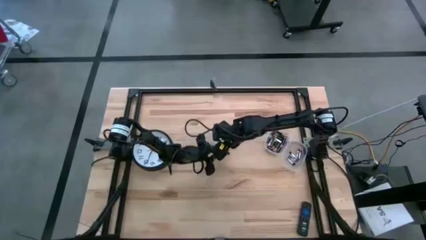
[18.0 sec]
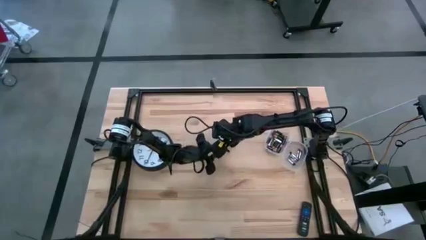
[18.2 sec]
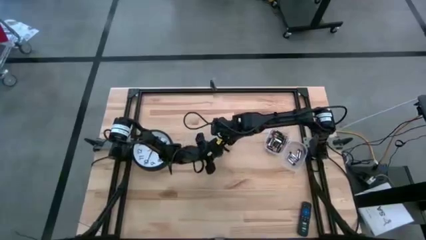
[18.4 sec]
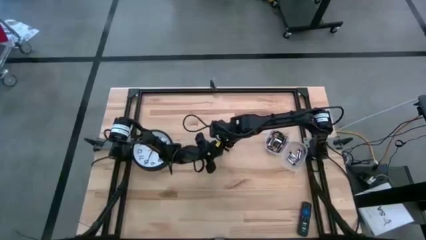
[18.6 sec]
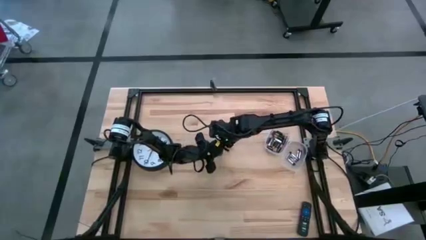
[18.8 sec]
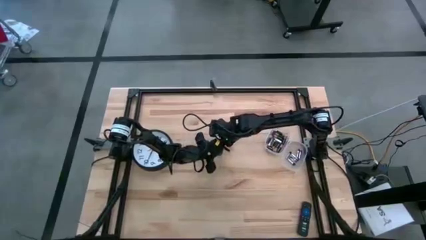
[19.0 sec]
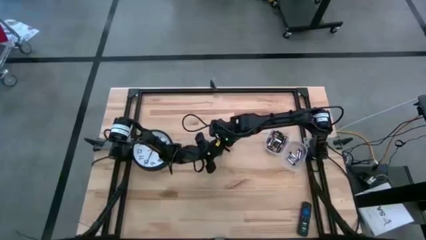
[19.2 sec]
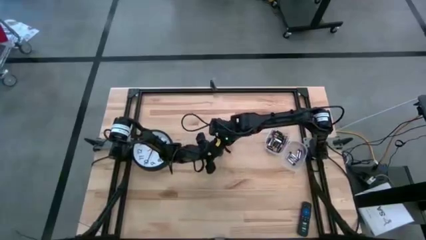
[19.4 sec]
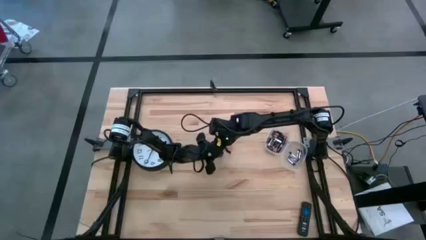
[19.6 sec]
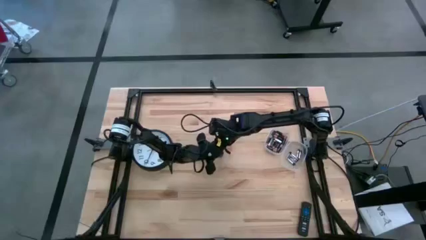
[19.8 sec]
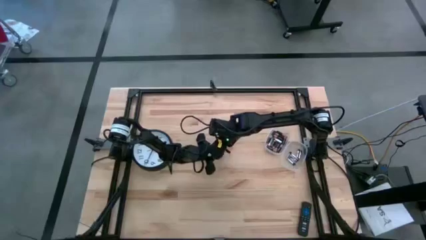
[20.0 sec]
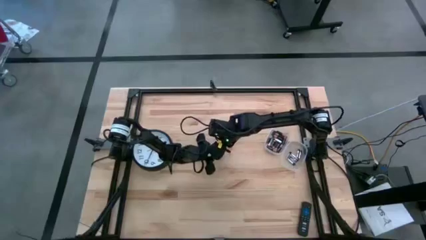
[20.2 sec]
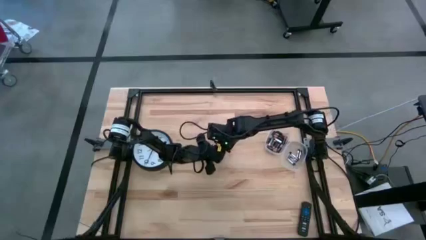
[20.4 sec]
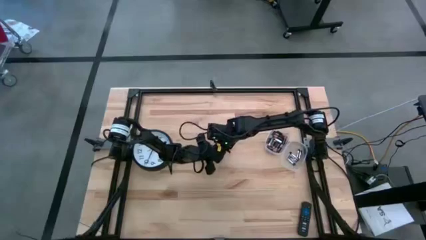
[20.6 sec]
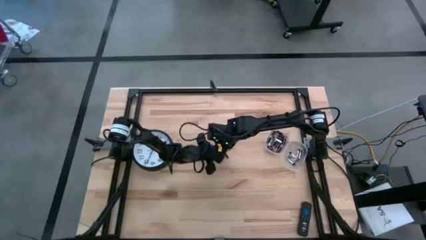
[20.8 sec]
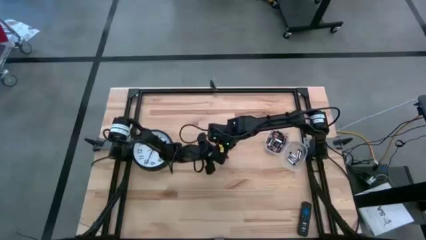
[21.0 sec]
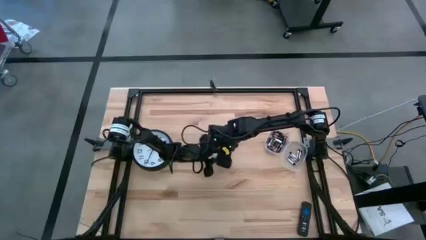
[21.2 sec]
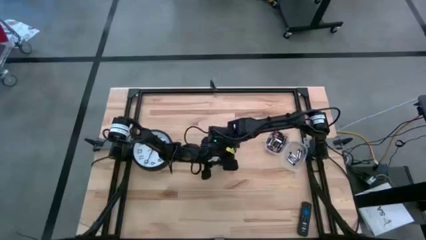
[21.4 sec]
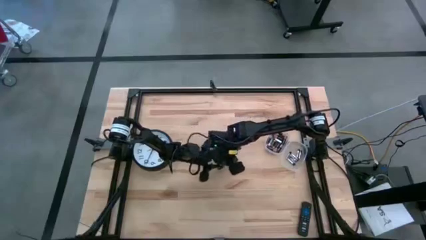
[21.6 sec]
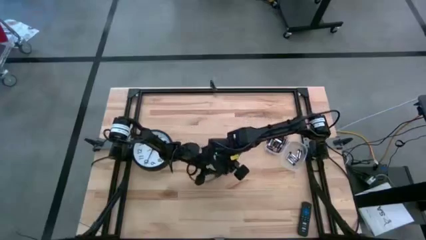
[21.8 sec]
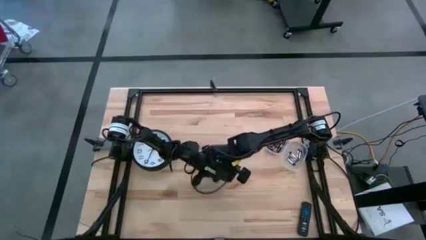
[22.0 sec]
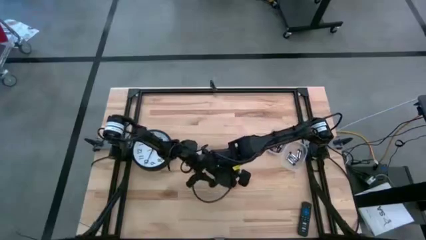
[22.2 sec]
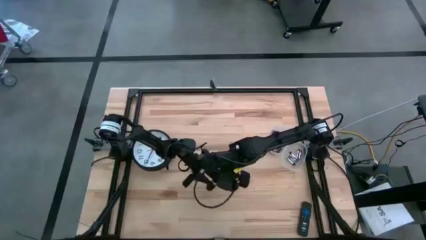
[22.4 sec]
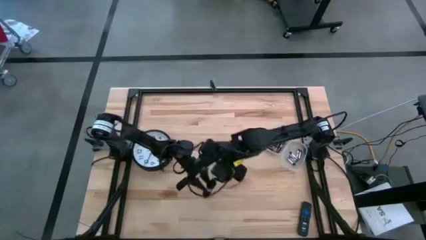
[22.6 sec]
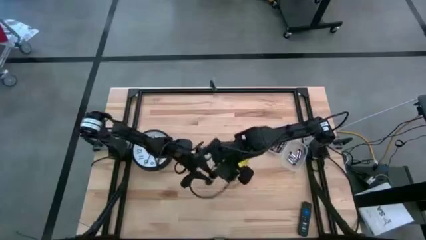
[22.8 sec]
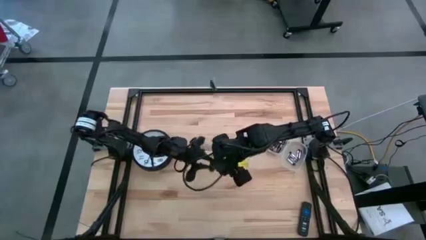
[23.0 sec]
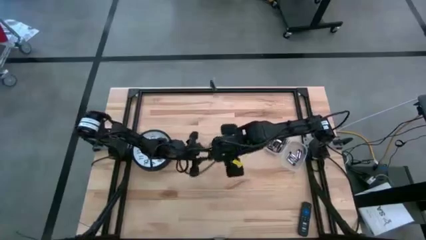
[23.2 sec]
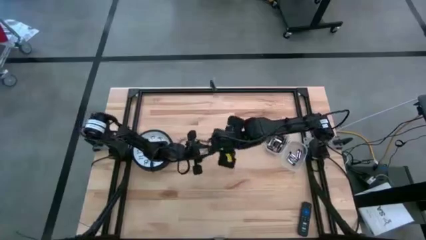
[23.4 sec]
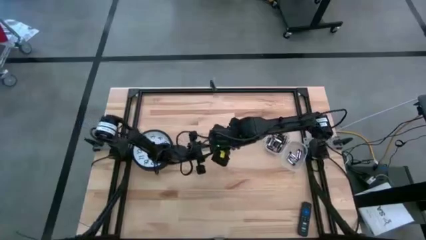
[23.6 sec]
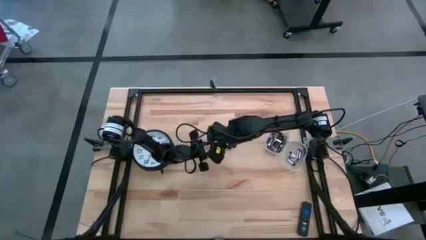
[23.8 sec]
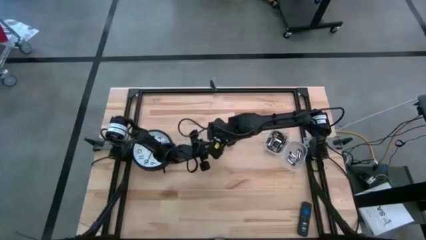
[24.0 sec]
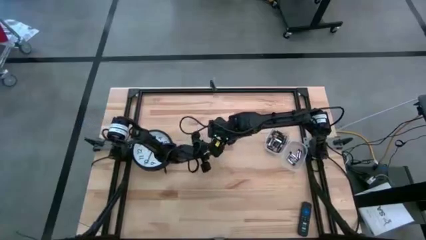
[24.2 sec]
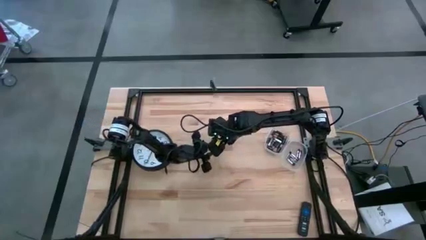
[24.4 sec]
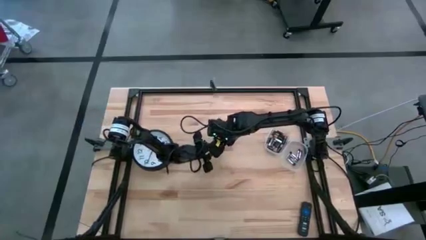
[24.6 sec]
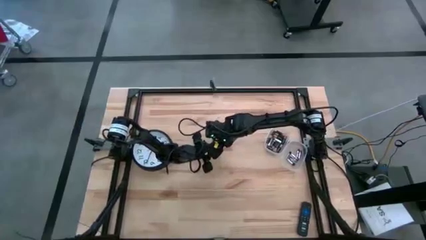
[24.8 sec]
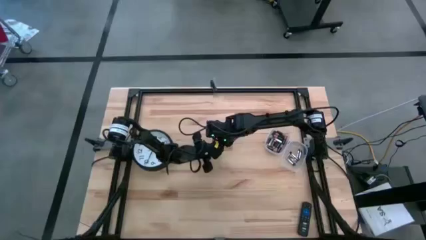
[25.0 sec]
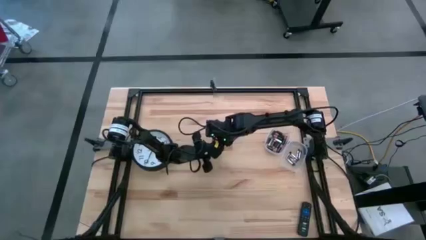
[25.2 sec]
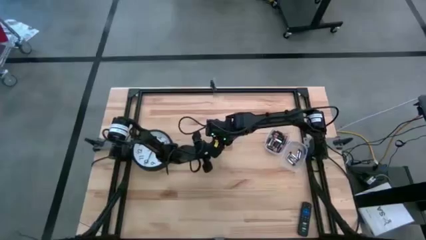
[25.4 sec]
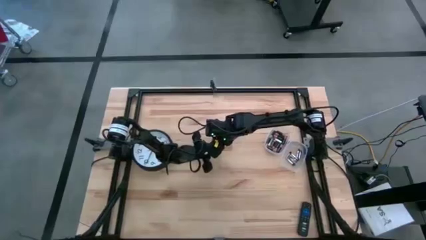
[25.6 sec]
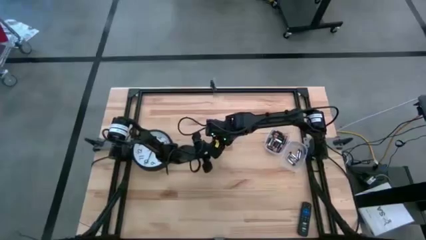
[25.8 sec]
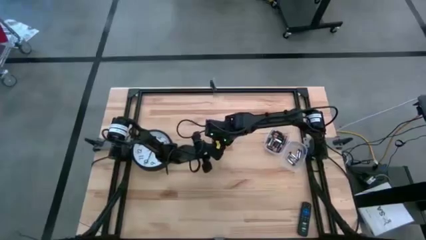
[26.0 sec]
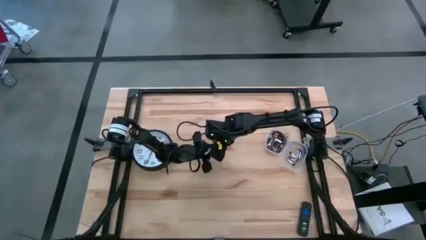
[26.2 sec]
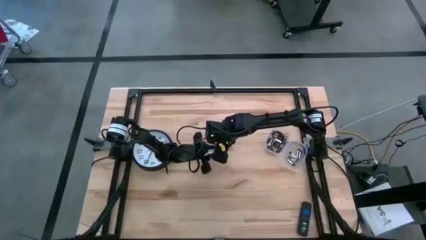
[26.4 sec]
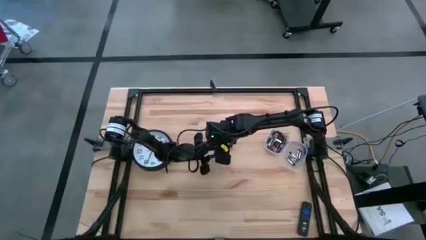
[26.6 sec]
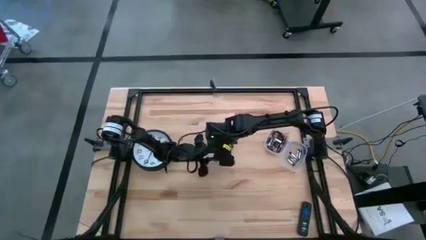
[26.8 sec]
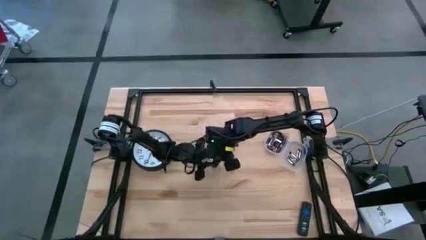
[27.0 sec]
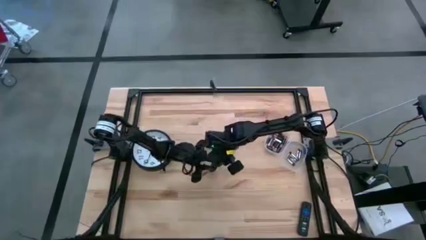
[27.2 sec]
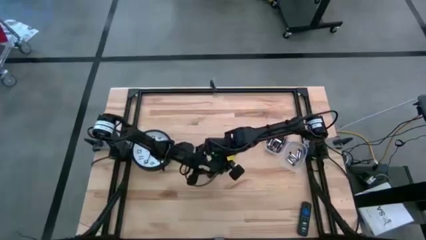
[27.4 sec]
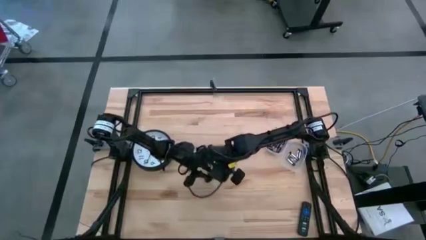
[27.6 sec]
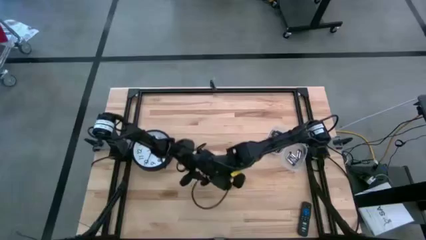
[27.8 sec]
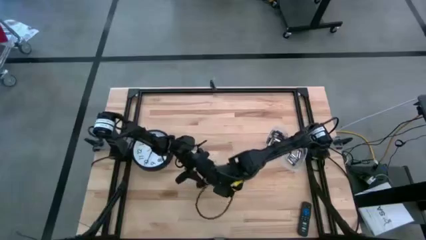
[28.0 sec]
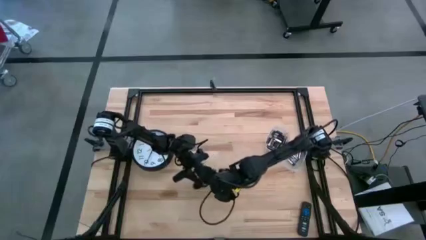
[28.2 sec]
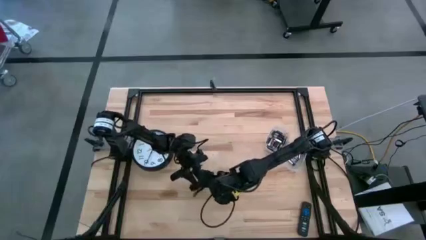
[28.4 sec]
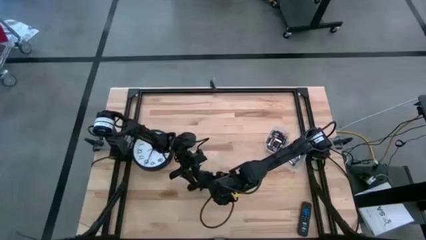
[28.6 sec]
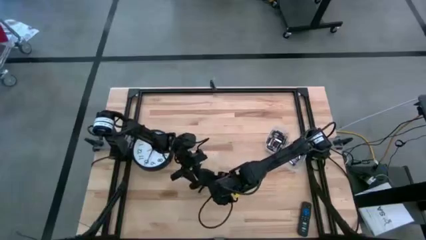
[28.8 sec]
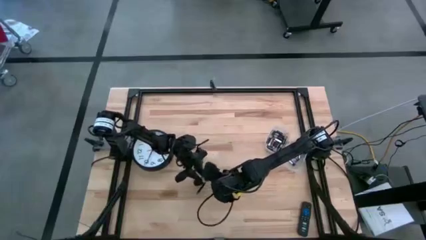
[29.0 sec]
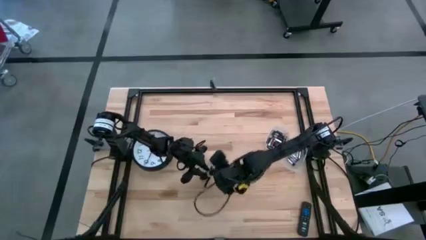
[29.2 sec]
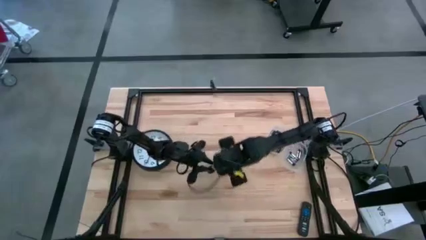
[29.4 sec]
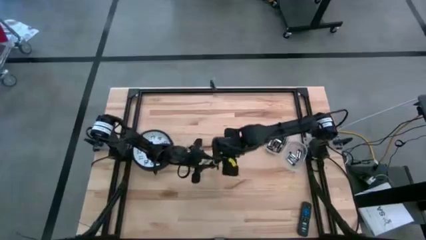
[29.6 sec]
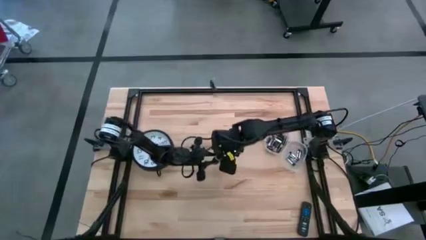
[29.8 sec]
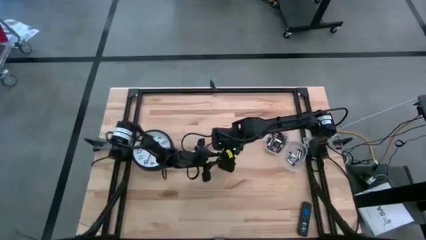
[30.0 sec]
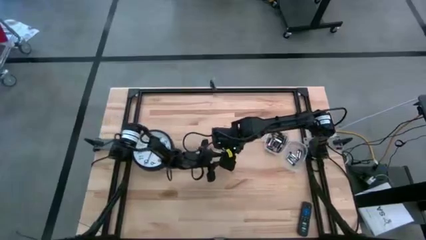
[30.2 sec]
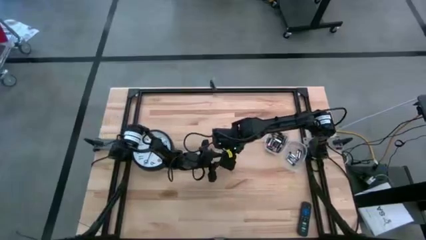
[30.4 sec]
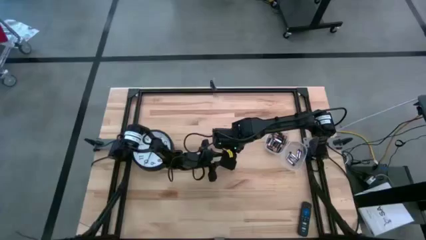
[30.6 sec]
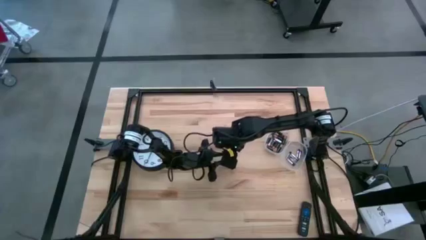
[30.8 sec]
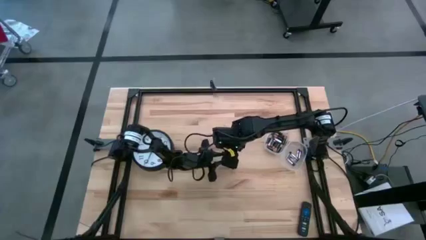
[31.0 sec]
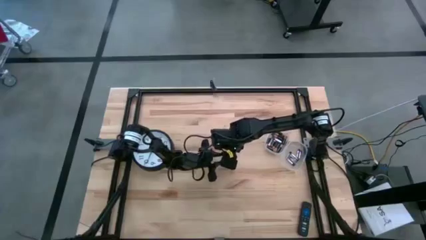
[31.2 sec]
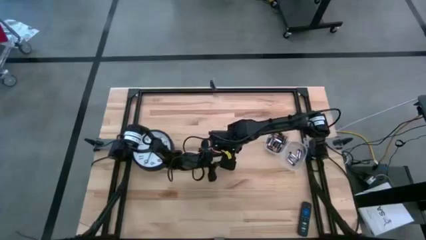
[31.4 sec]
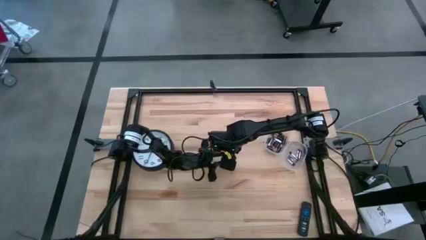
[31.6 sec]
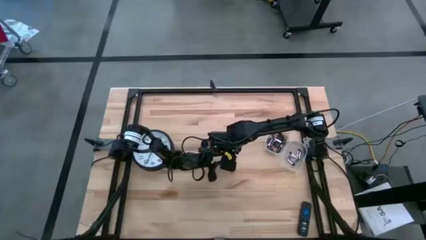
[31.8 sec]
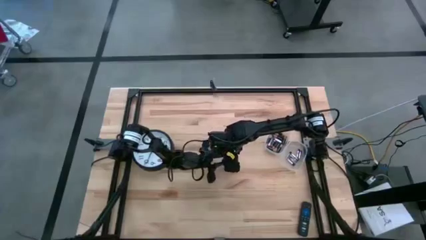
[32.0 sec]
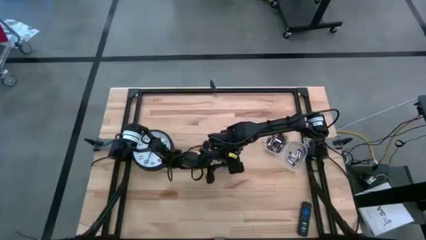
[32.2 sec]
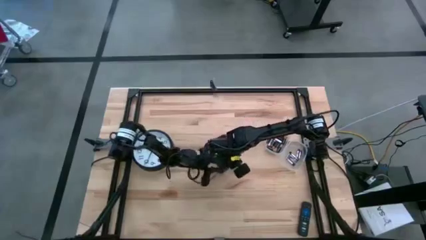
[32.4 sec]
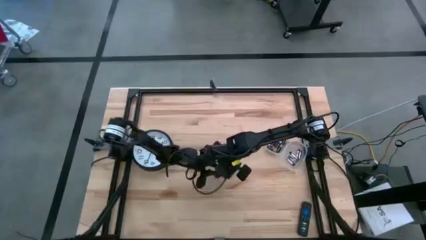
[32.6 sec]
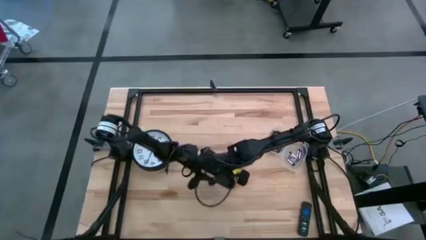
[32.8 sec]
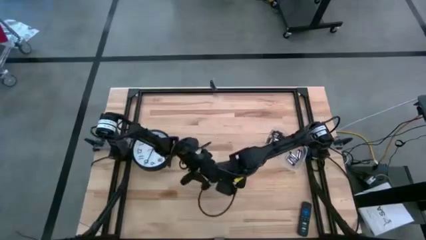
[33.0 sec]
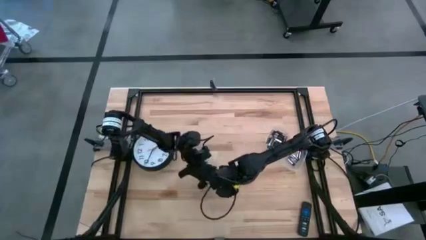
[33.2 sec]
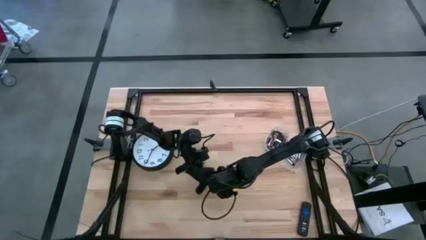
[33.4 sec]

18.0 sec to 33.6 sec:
Task: Insert battery
Open the black flashlight battery compartment
